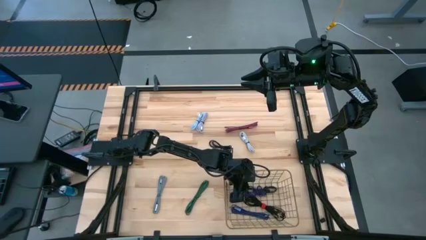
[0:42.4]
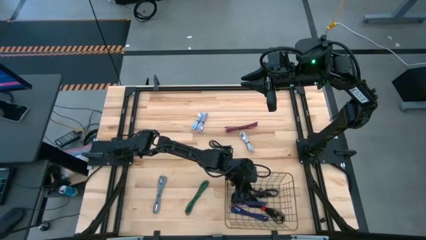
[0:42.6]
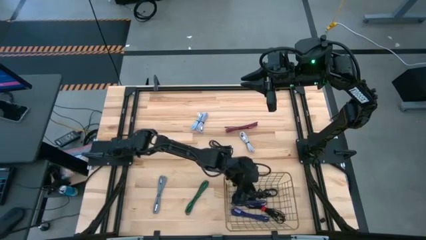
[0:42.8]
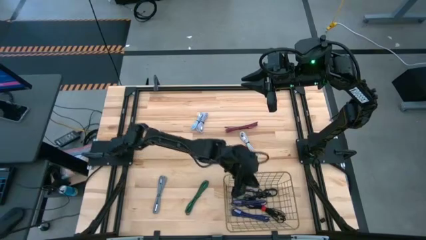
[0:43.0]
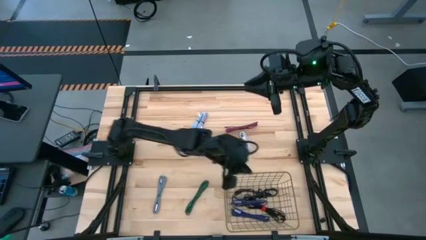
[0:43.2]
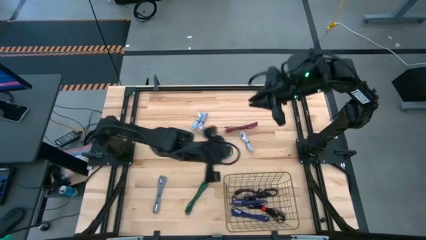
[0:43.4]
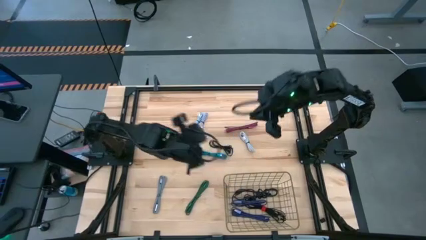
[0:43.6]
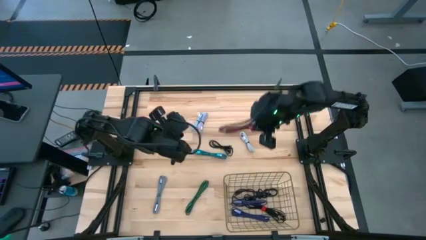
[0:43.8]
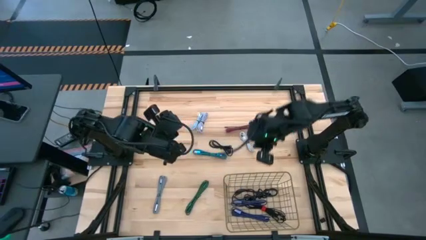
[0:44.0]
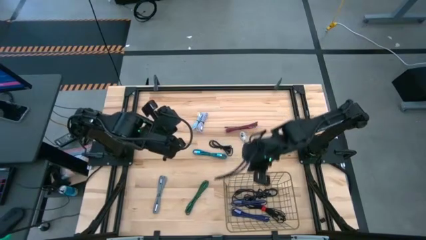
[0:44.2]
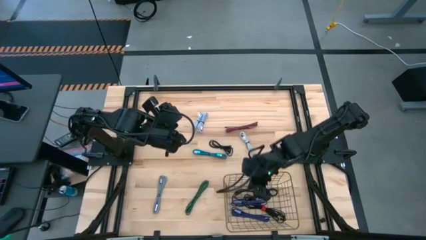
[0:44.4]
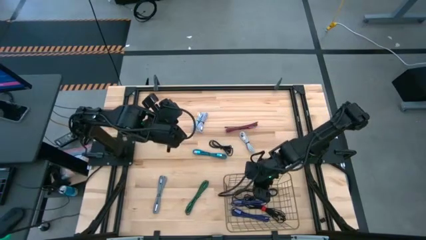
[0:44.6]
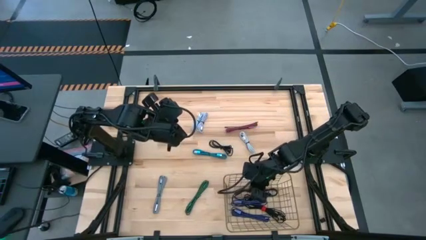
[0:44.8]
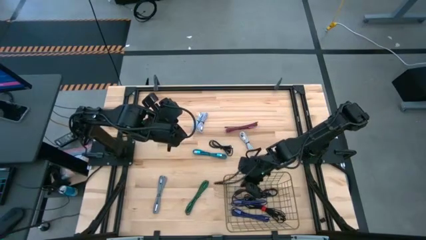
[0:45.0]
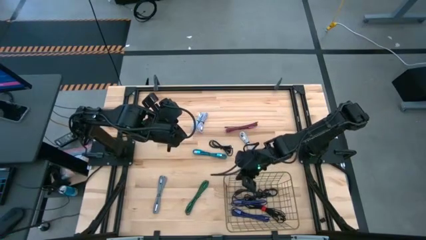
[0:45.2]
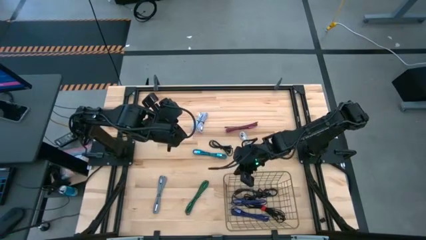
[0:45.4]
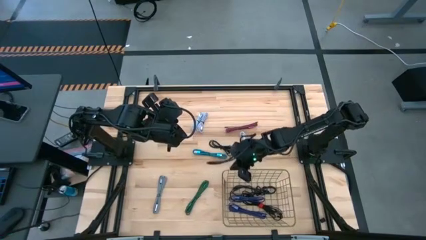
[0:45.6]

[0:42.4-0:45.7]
Task: Pick and place USB-C Cables
Adjust the wire basket

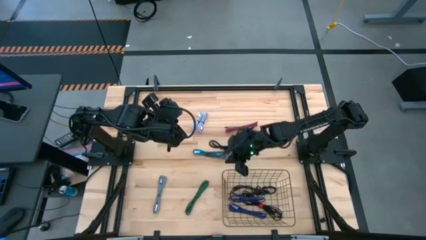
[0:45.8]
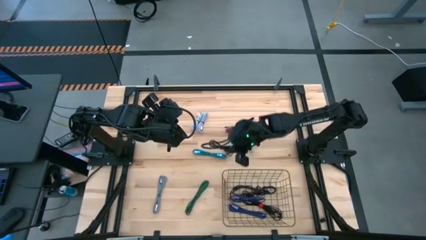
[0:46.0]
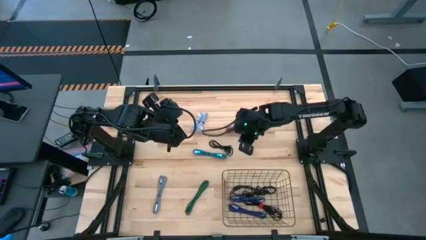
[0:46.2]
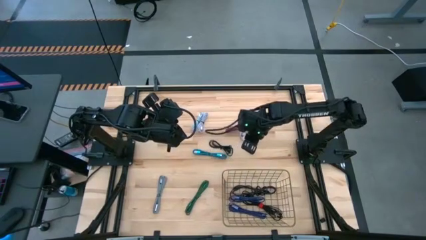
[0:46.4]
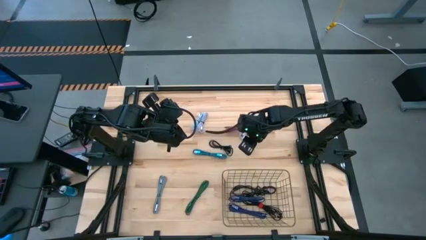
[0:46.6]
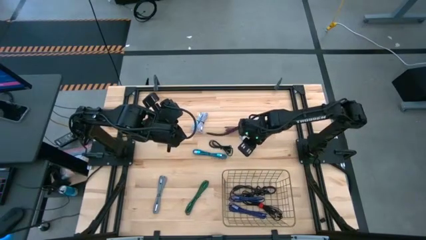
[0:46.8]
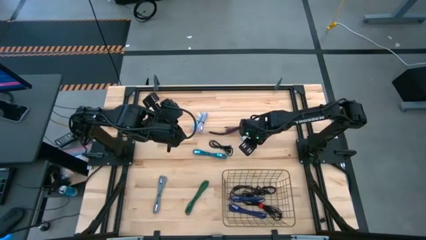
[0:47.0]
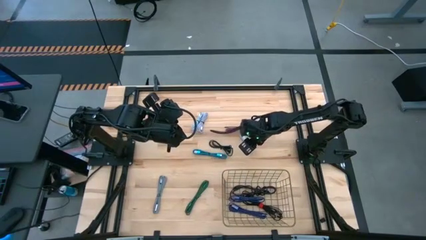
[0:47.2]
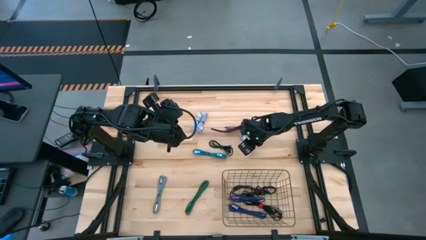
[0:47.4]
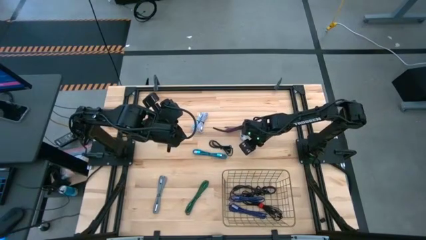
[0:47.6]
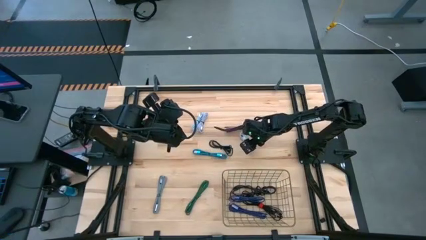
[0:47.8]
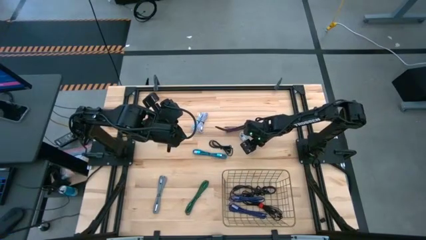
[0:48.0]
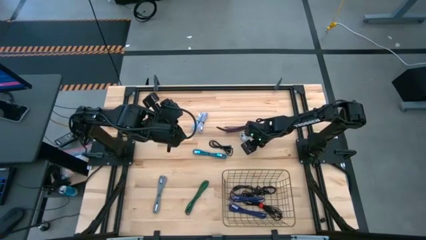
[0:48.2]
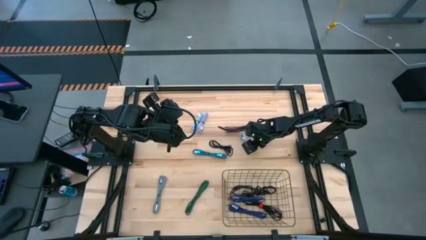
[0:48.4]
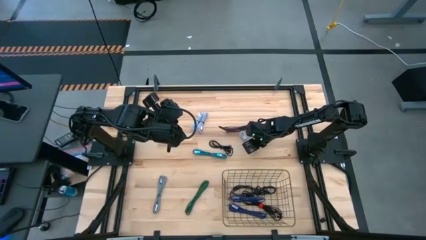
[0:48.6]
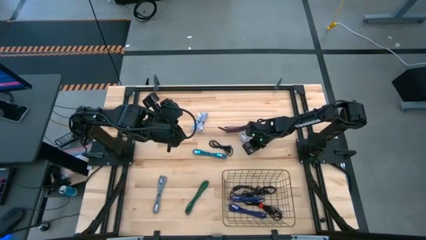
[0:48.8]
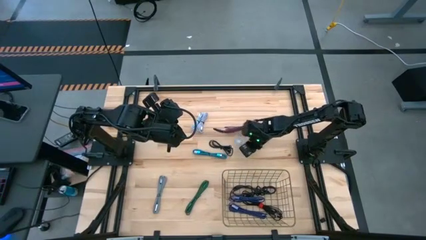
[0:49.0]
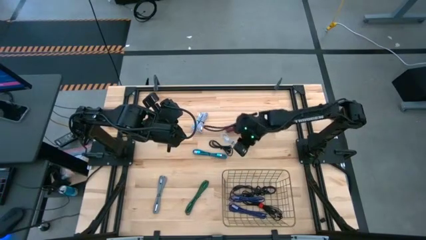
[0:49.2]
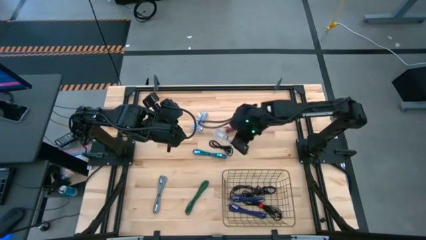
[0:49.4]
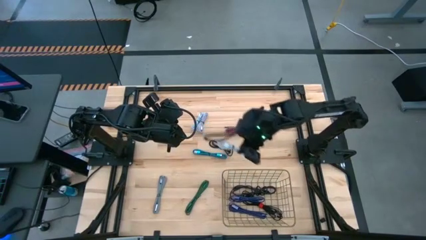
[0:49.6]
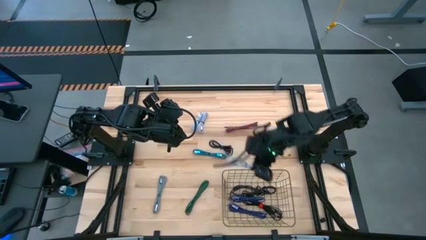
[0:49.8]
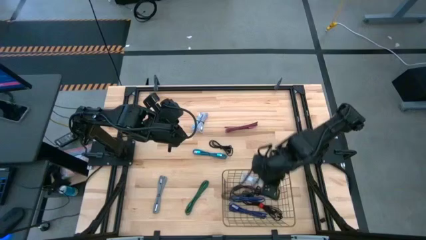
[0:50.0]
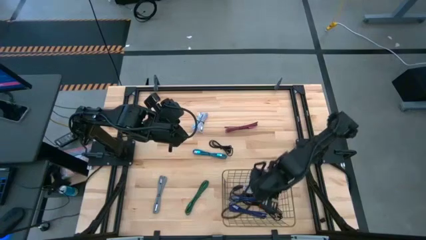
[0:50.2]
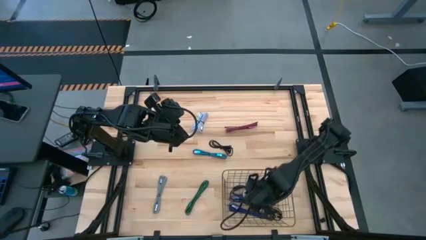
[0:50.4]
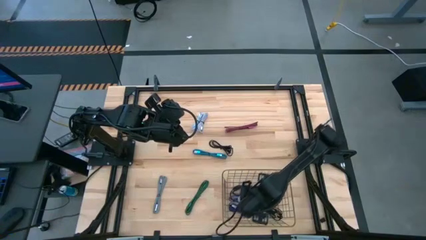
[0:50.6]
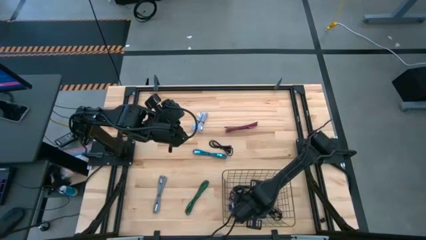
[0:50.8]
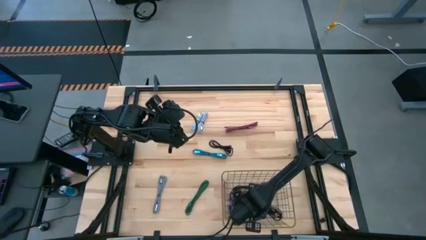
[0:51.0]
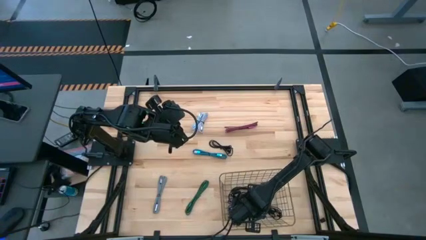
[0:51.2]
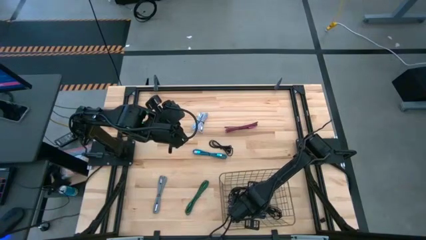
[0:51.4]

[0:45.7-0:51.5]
Put the gray charger cable into the wire basket

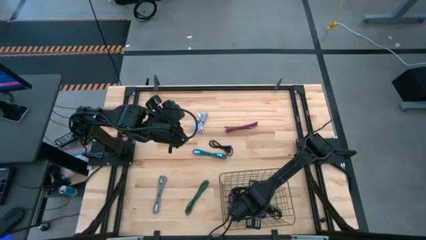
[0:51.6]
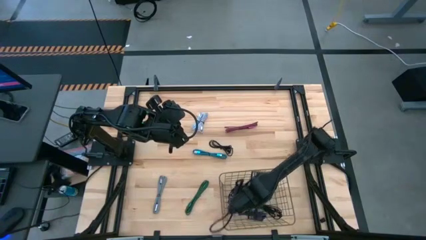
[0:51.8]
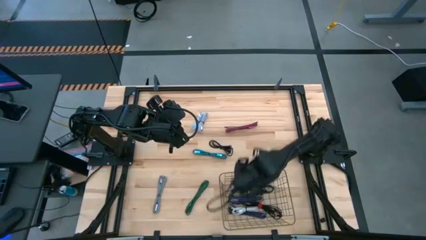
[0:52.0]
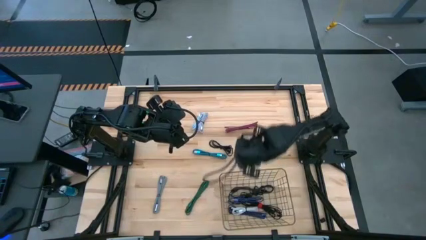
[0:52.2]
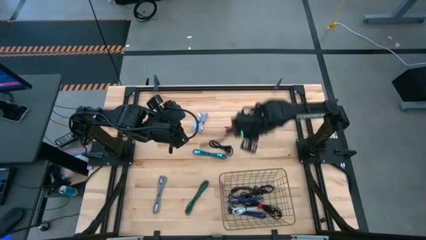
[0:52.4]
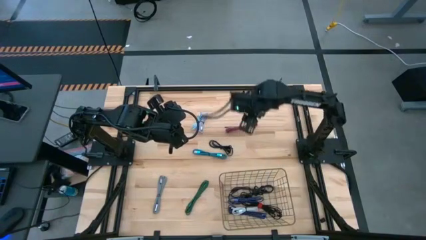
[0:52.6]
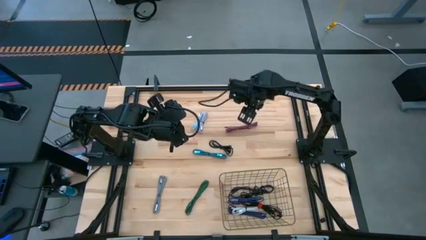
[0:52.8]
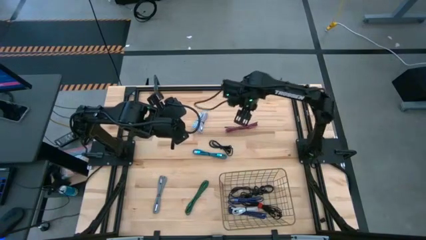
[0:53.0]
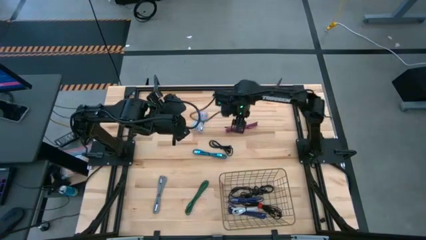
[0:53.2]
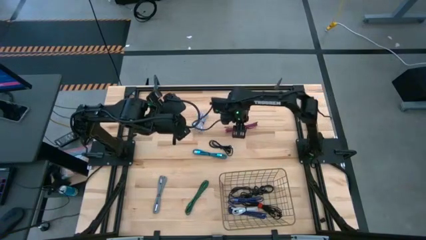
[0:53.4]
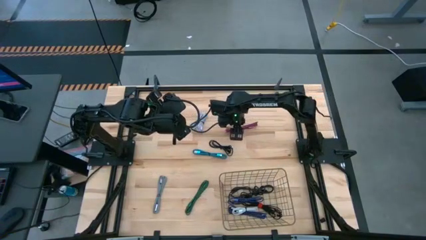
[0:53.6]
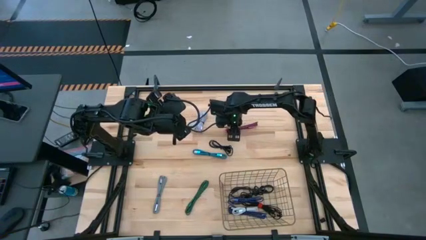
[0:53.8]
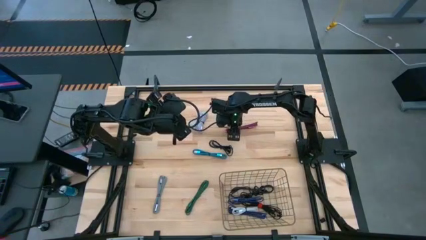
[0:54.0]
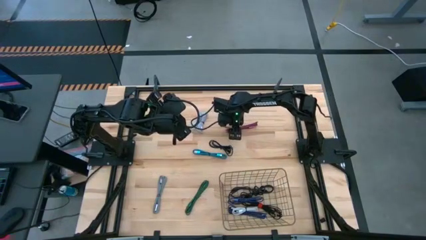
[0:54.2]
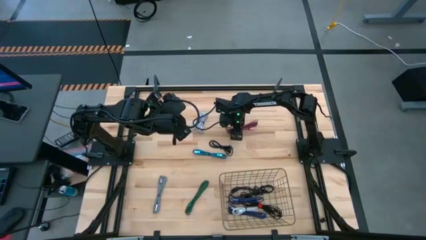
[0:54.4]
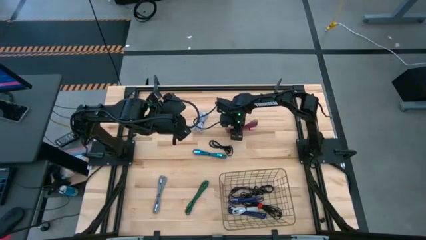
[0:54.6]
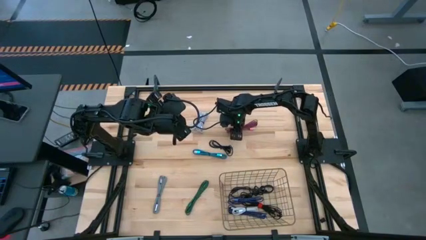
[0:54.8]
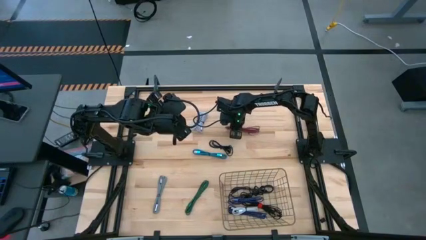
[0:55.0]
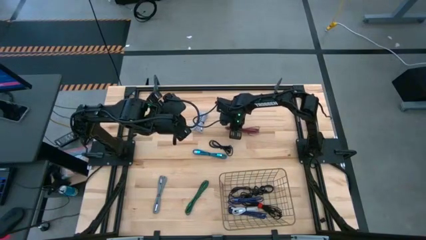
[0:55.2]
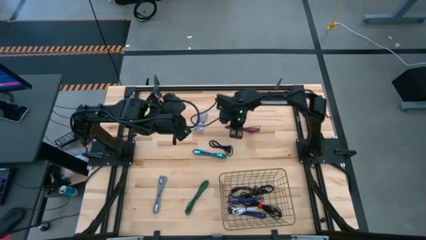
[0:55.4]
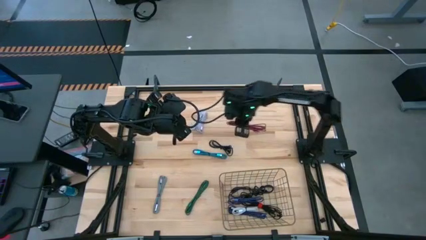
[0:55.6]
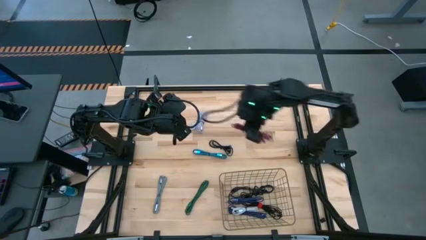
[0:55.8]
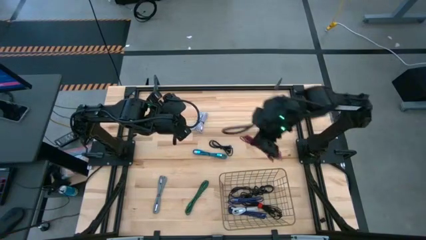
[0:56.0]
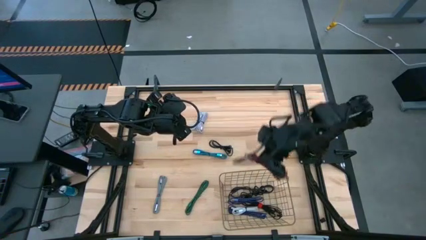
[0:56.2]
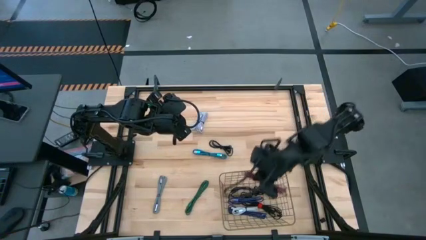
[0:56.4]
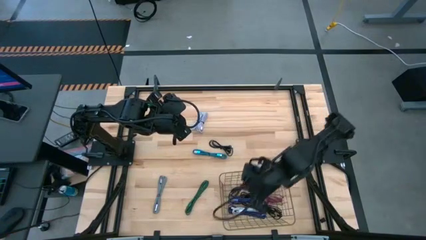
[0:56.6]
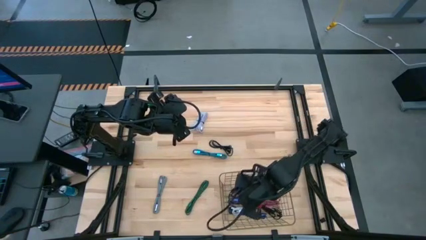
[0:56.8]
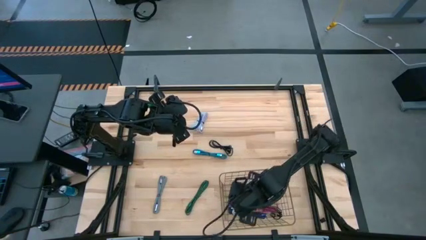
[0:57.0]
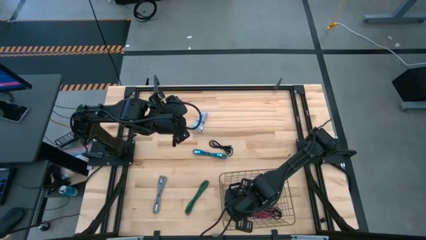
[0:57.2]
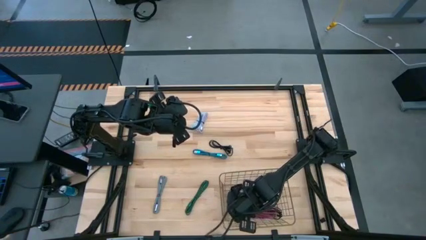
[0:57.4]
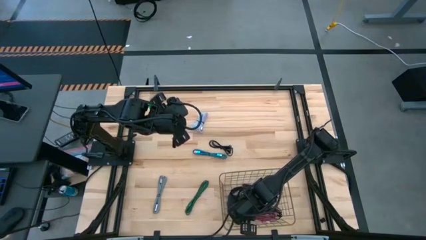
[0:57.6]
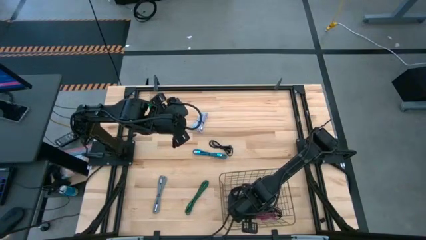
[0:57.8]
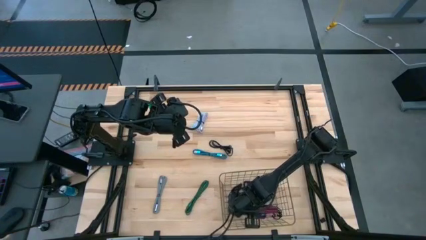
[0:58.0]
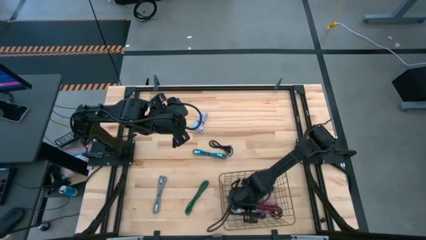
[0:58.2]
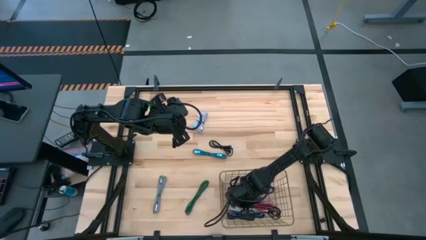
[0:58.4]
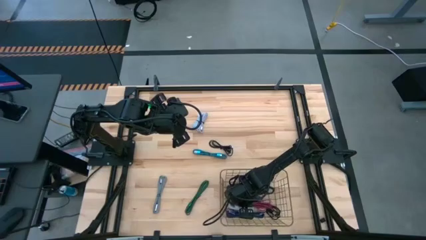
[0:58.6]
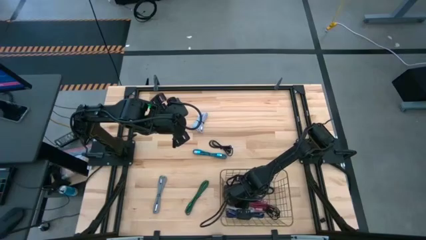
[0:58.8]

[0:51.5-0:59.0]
Put the black pink charger cable into the wire basket
